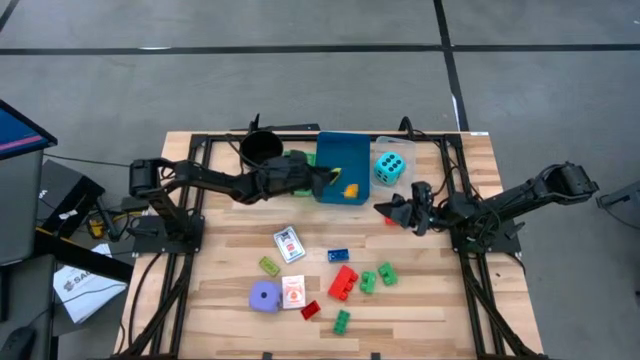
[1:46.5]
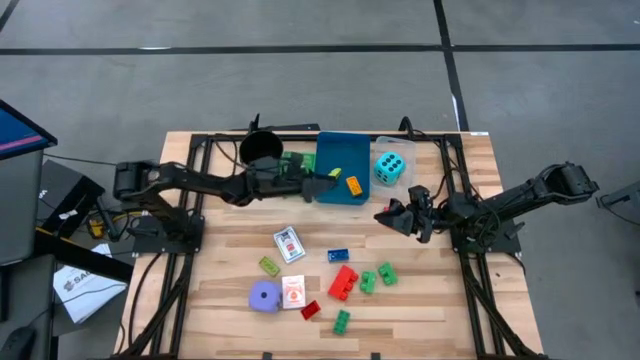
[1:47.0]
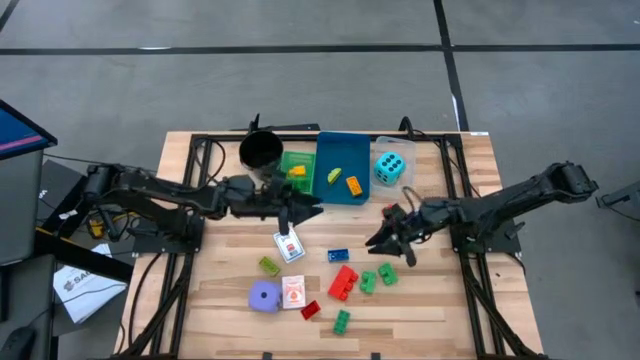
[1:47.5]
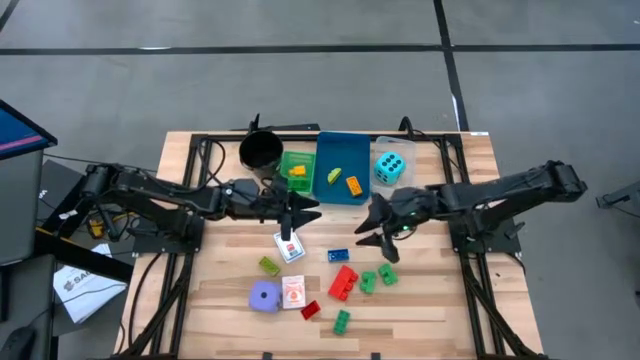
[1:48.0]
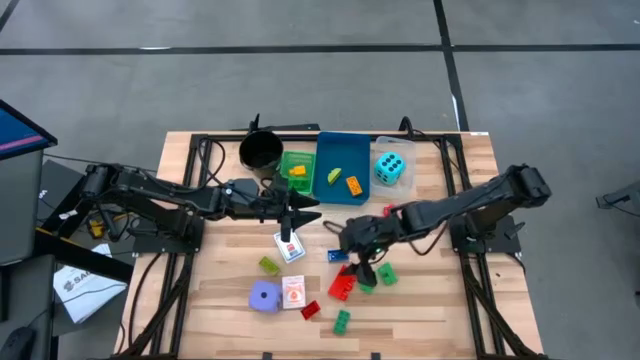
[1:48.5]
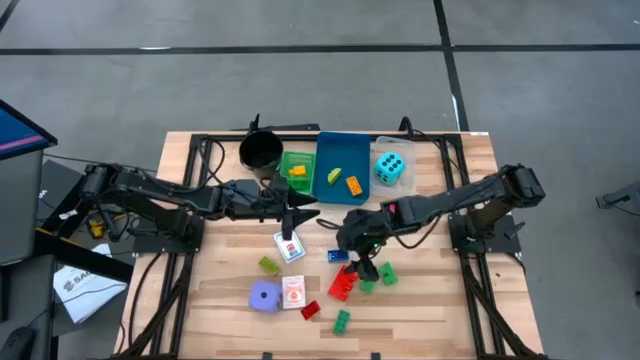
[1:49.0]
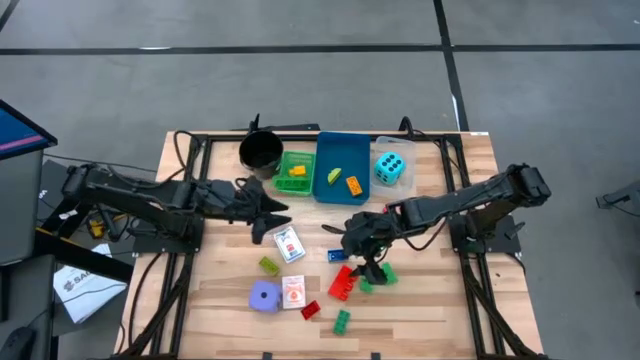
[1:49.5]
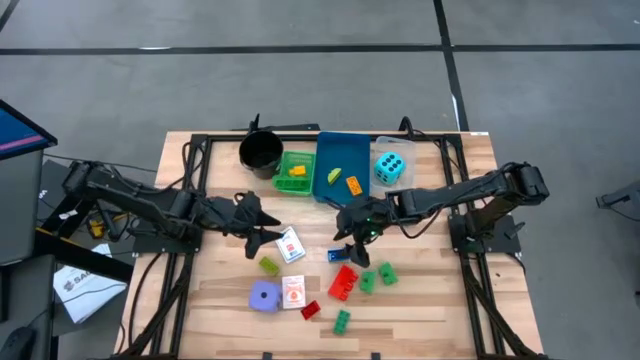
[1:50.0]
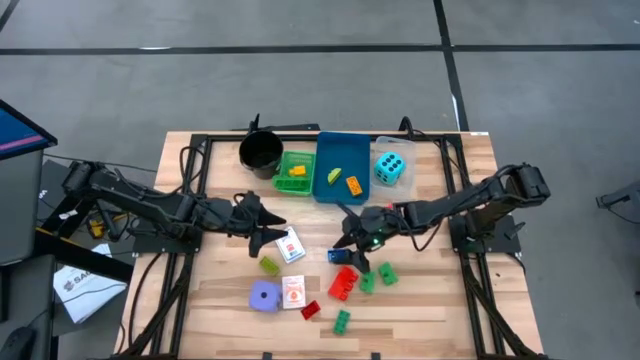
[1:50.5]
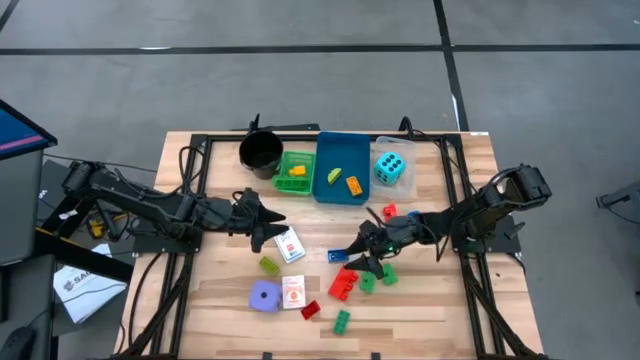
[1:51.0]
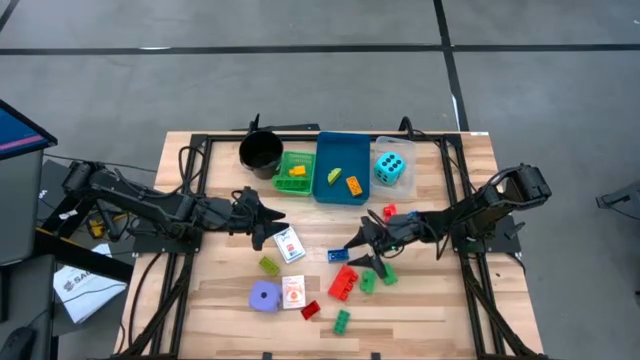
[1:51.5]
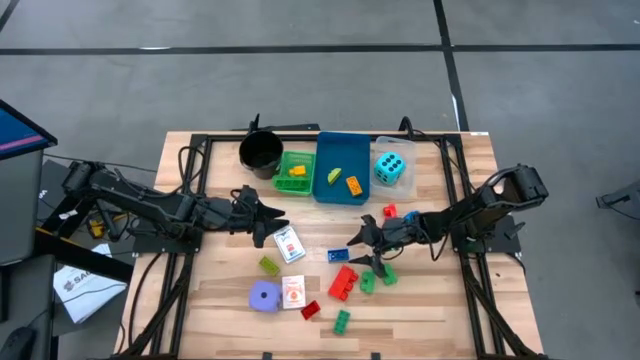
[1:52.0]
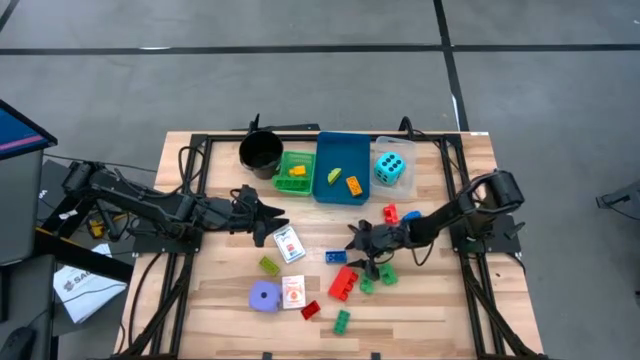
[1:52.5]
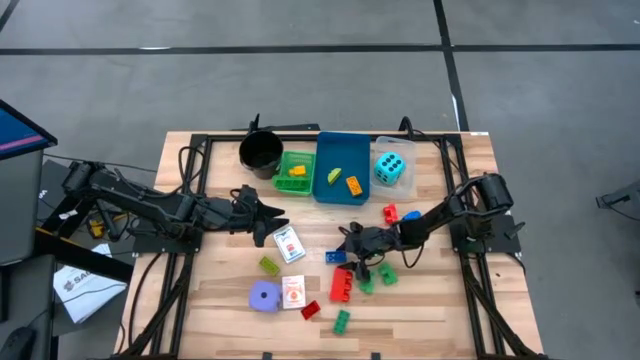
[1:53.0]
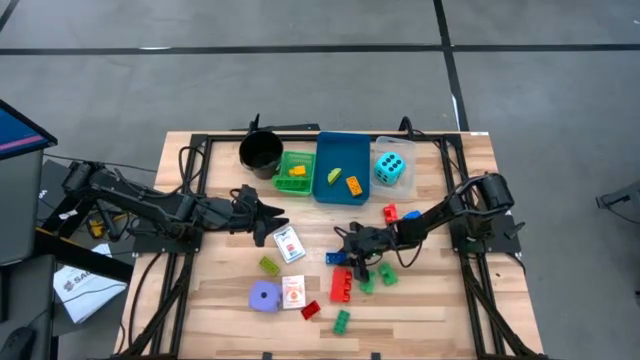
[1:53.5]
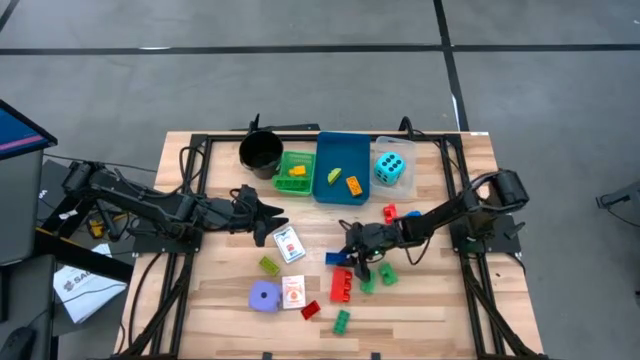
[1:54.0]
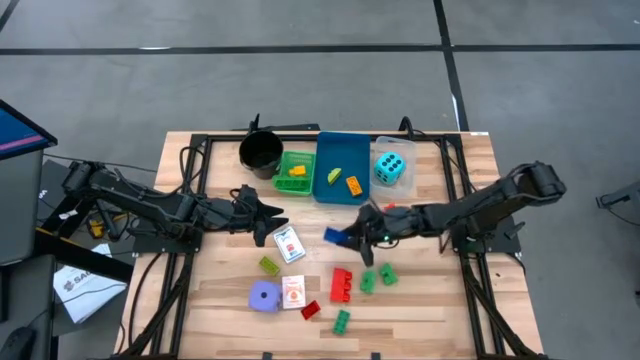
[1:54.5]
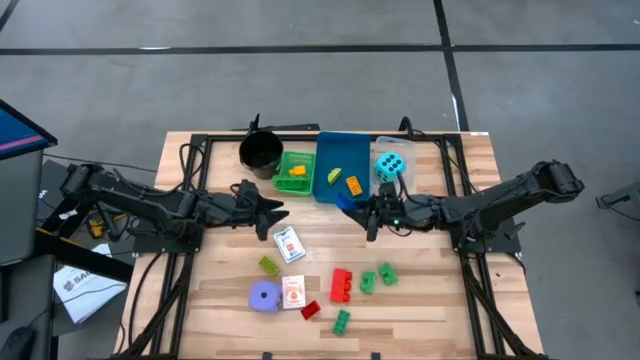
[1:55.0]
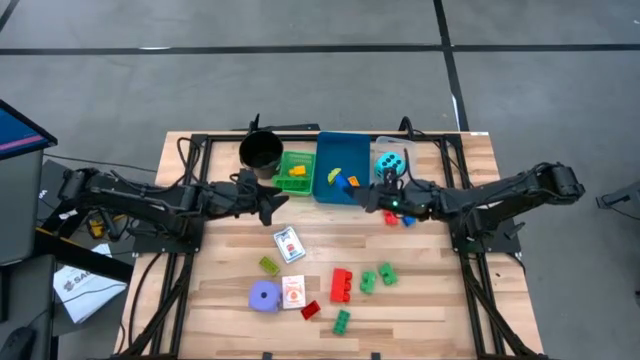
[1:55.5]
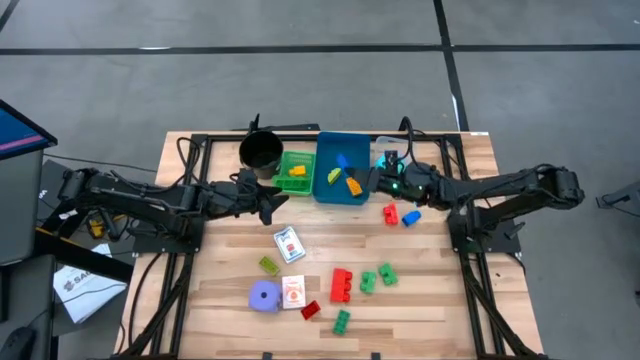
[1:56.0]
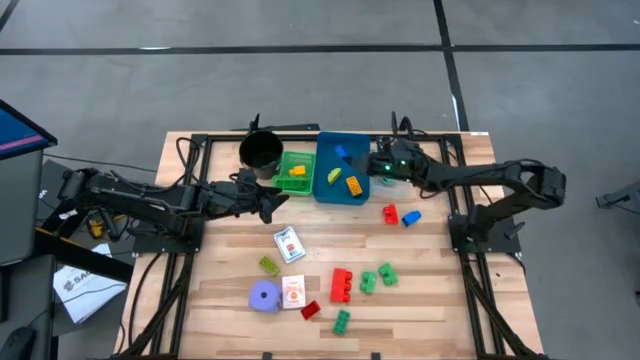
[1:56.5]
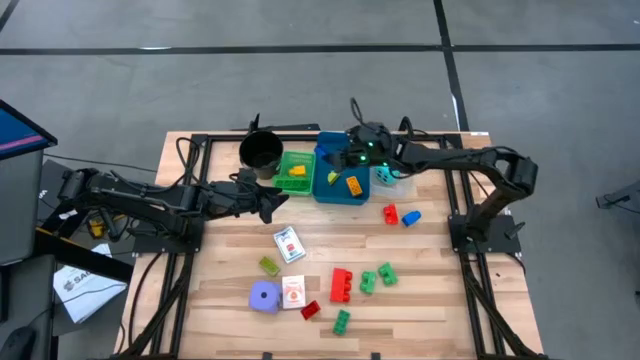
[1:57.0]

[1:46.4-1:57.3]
Task: Pick & Place Toys
Put the small stud blue game piece into the blue bin

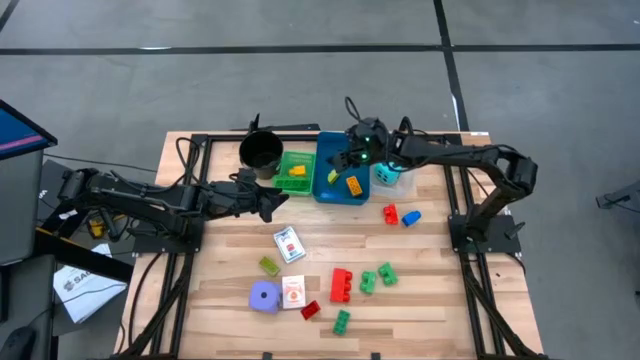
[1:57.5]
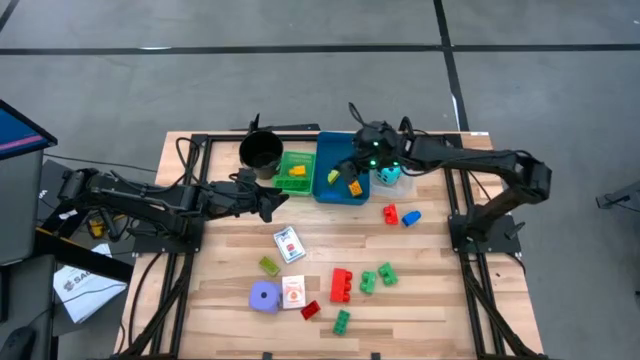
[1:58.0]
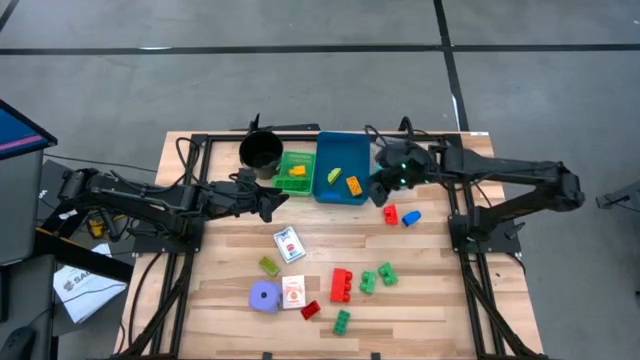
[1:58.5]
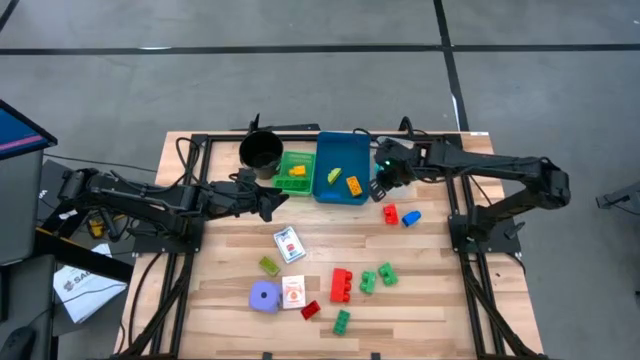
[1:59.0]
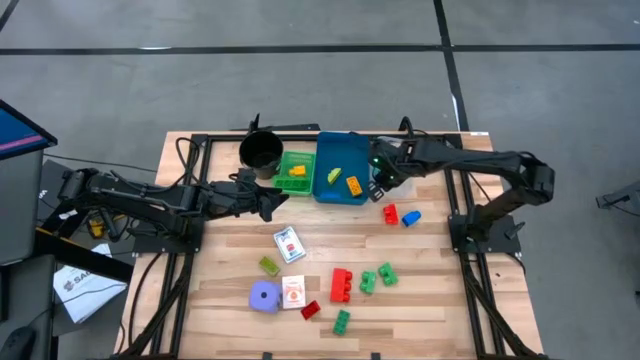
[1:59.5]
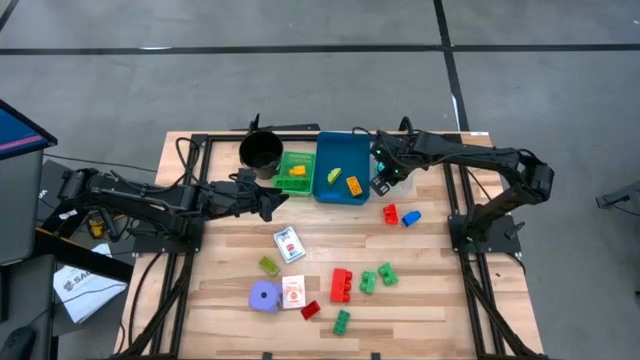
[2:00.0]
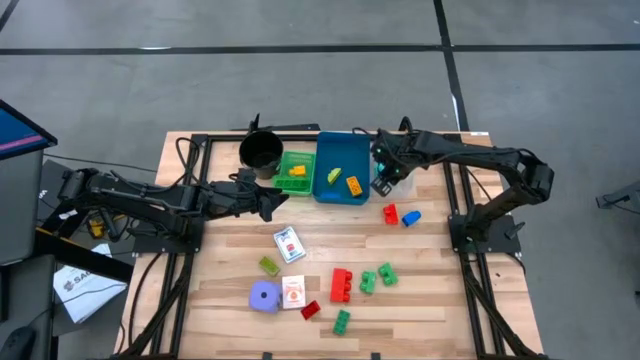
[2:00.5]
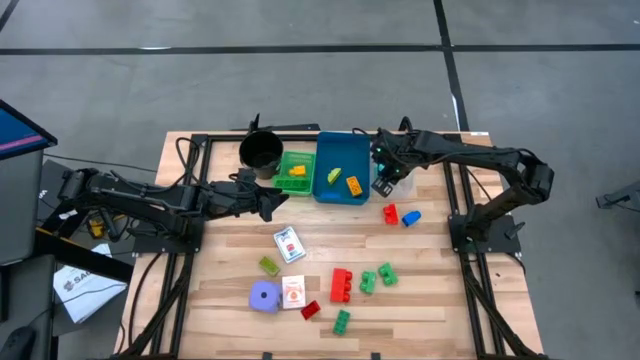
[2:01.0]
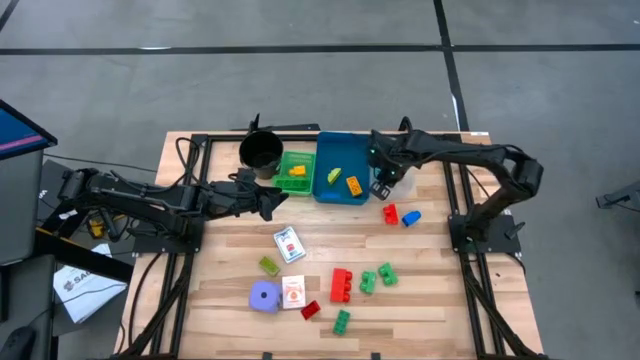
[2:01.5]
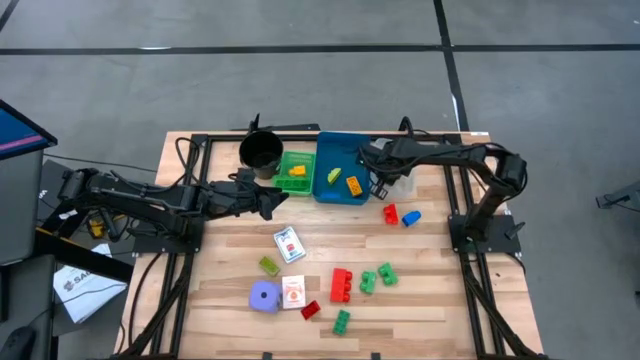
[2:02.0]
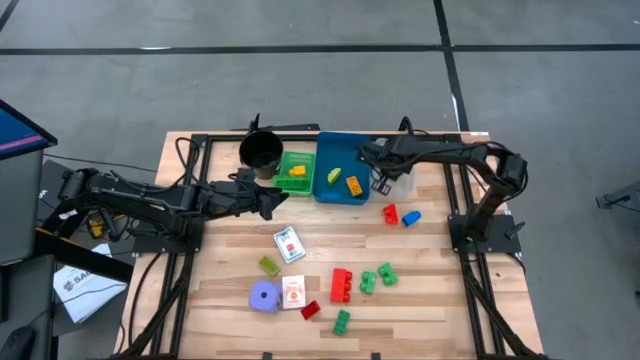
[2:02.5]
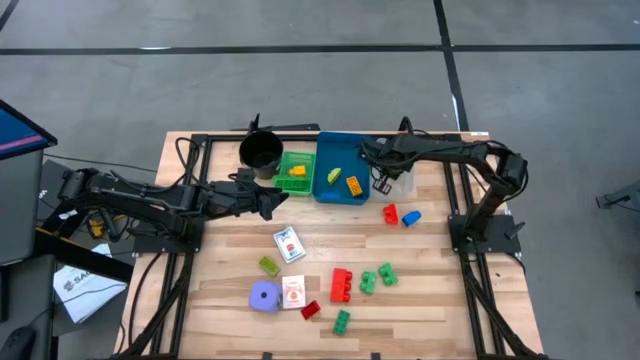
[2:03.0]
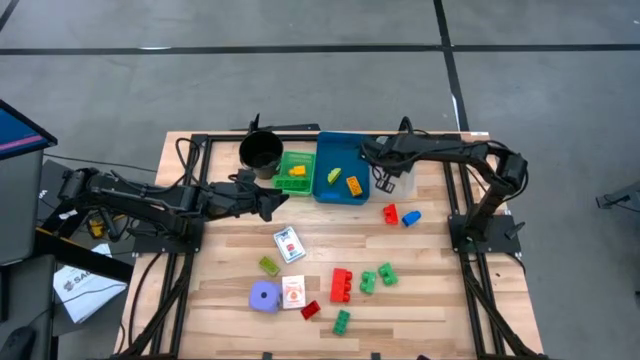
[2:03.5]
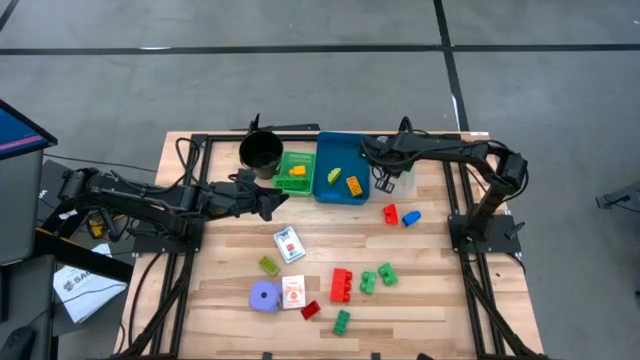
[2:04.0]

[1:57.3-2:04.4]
Adjust the light blue dice in the transparent bin
